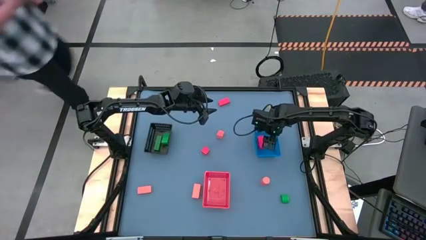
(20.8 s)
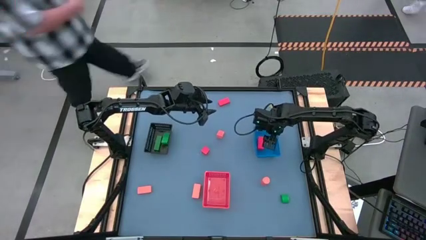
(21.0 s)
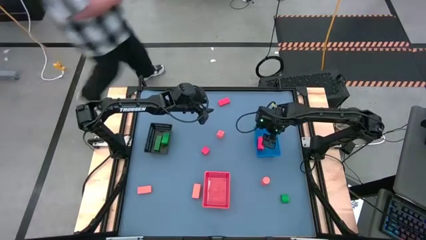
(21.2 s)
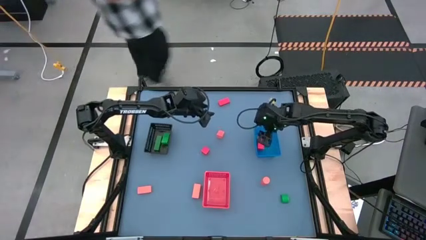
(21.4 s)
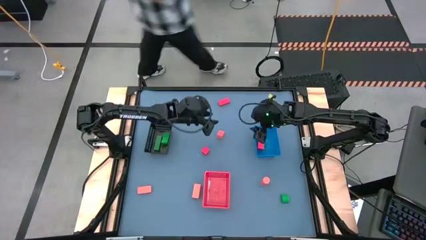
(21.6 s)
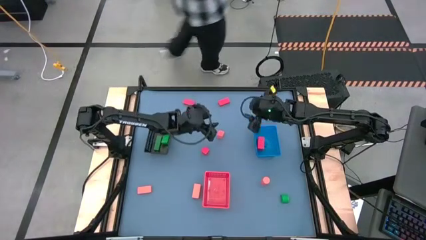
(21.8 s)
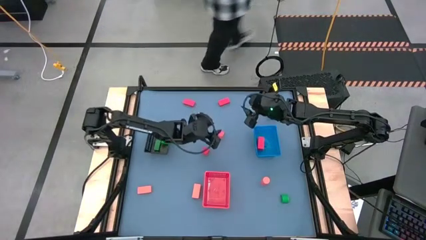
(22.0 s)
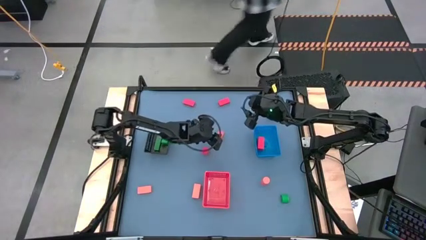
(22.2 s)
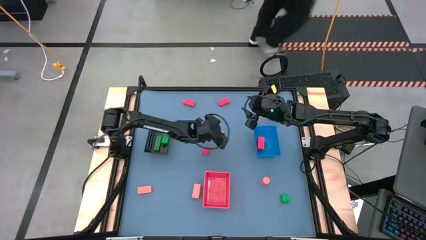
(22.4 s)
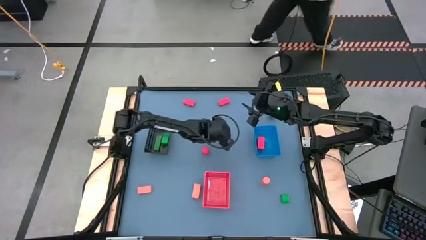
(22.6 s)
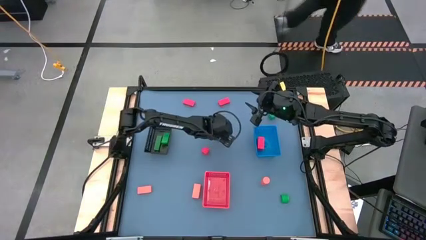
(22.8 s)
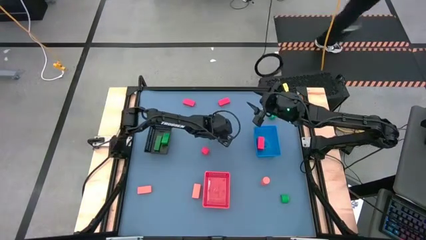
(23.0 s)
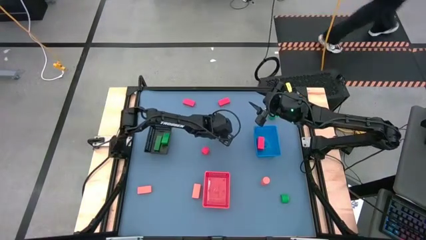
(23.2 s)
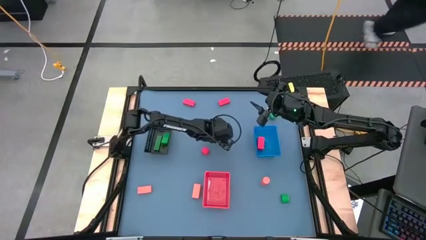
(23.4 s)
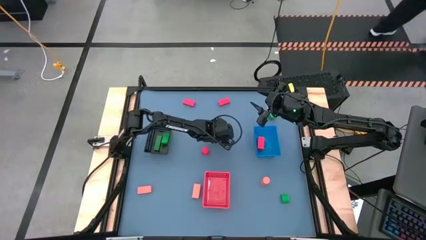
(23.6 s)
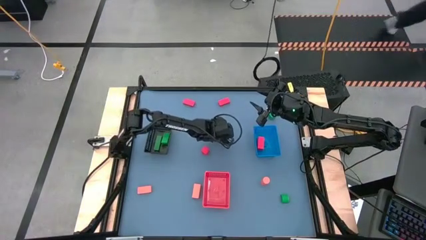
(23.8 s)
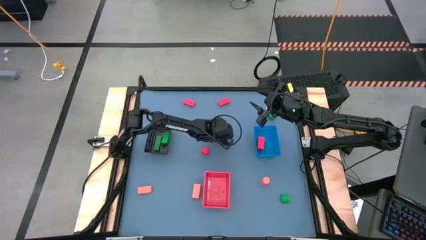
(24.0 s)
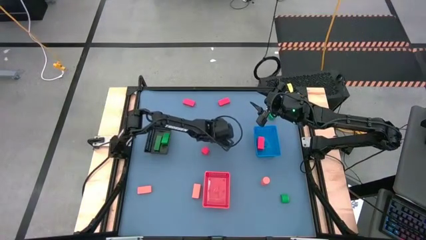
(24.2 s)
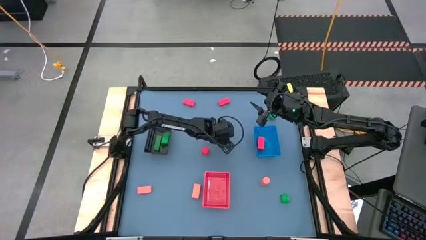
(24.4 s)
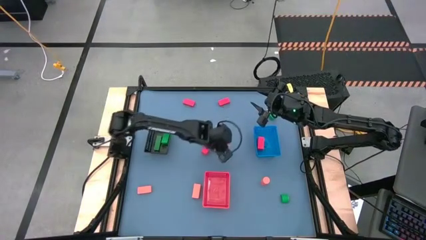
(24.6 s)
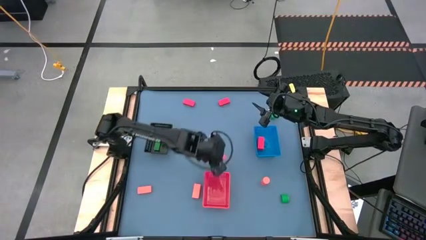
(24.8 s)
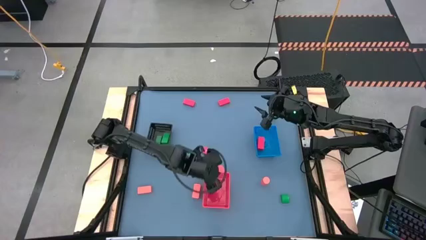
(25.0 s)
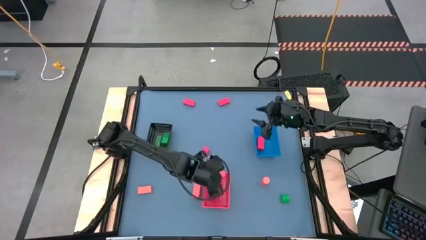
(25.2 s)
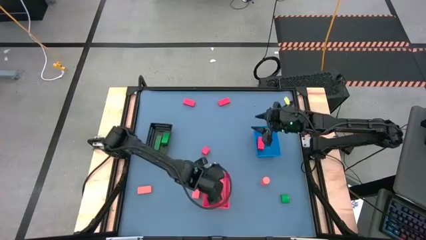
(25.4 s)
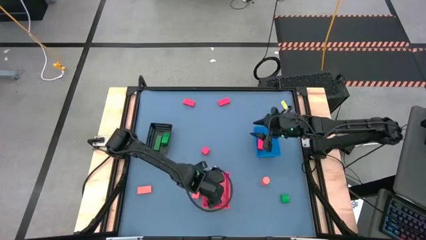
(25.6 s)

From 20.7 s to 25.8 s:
Task: Sort & place blocks by color
Put the orange block into the orange bin

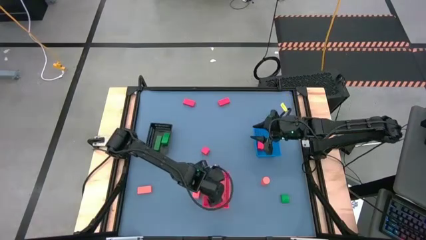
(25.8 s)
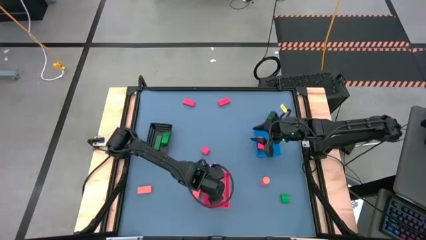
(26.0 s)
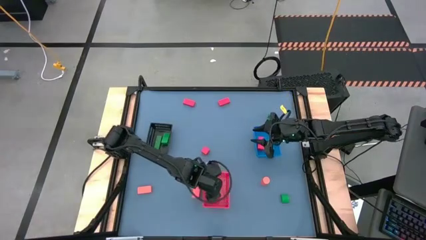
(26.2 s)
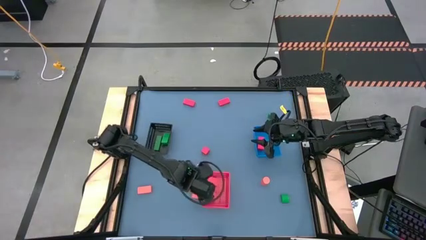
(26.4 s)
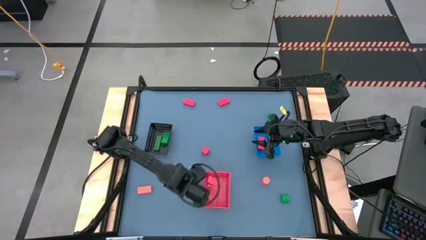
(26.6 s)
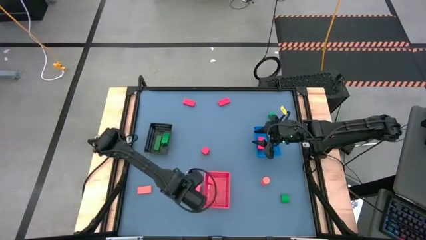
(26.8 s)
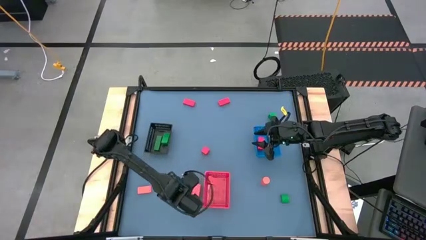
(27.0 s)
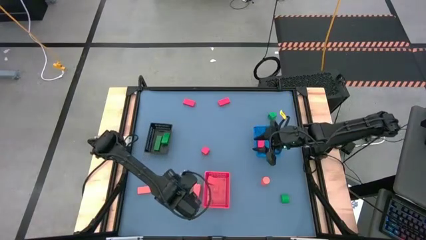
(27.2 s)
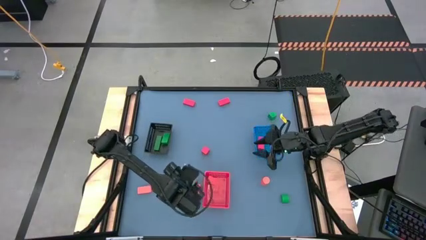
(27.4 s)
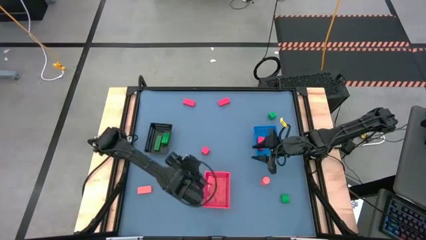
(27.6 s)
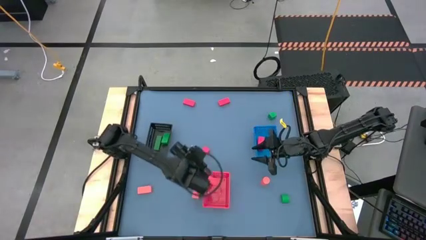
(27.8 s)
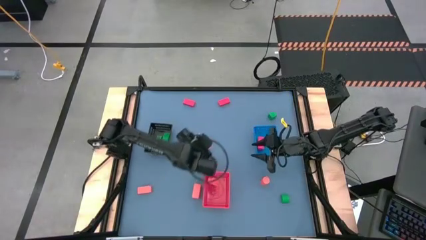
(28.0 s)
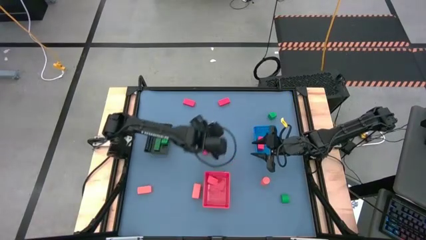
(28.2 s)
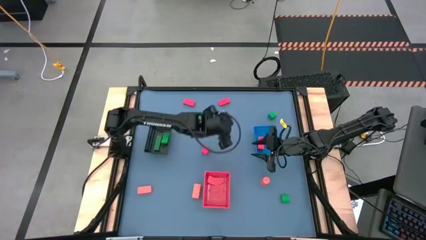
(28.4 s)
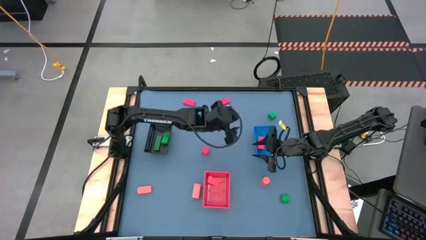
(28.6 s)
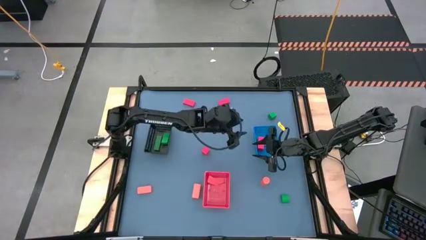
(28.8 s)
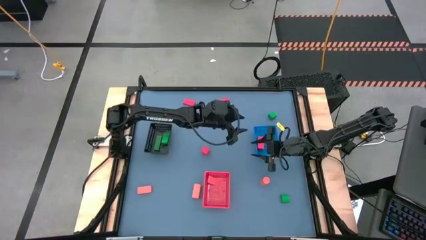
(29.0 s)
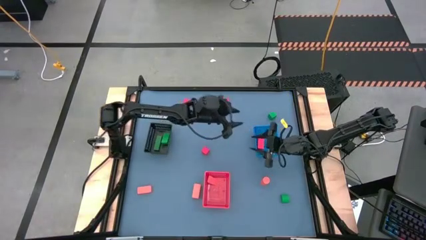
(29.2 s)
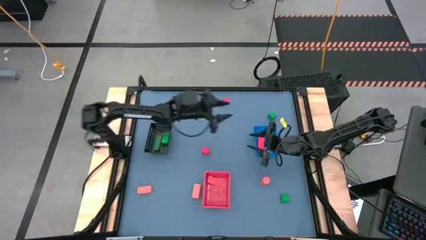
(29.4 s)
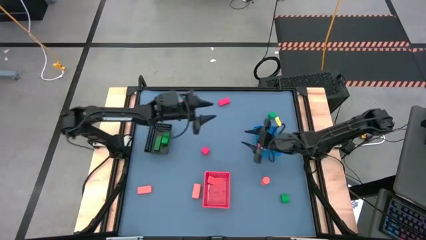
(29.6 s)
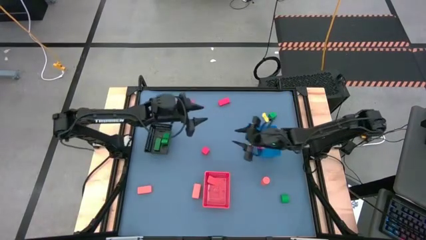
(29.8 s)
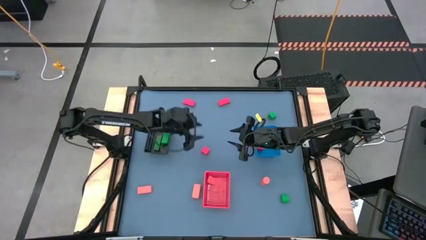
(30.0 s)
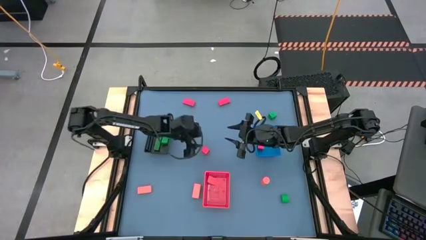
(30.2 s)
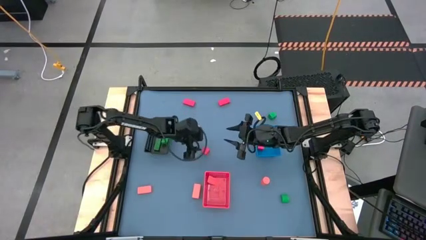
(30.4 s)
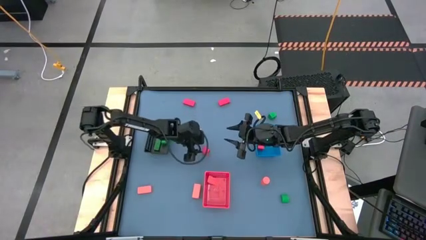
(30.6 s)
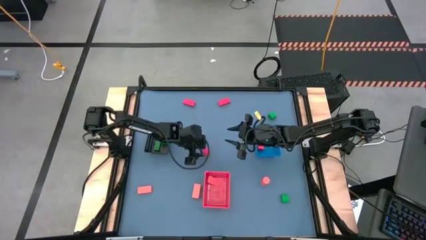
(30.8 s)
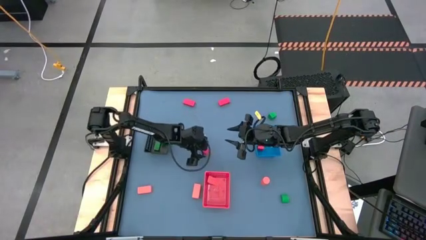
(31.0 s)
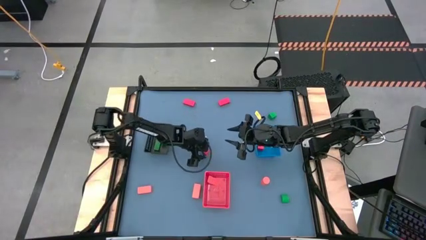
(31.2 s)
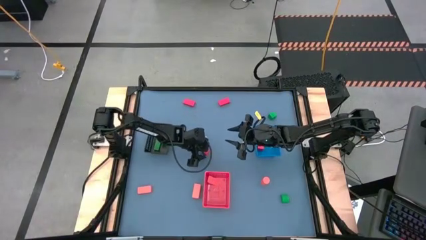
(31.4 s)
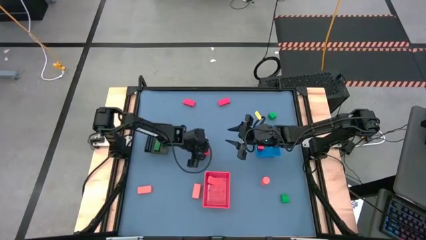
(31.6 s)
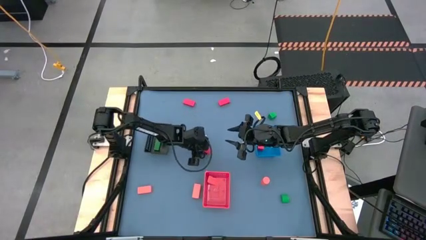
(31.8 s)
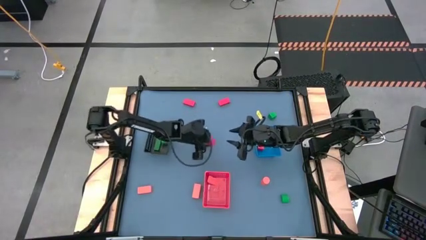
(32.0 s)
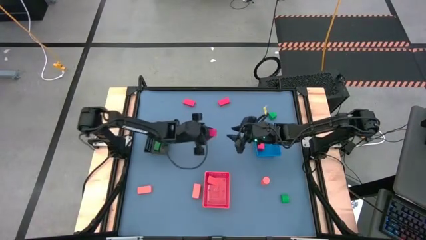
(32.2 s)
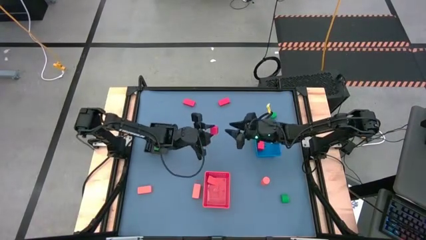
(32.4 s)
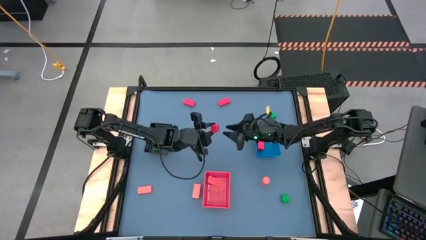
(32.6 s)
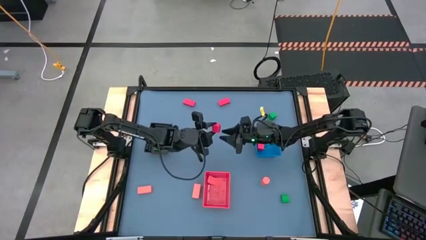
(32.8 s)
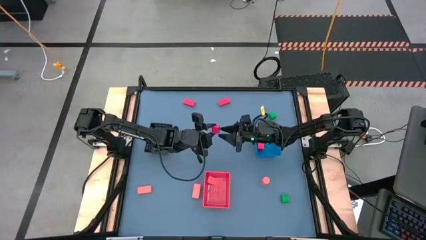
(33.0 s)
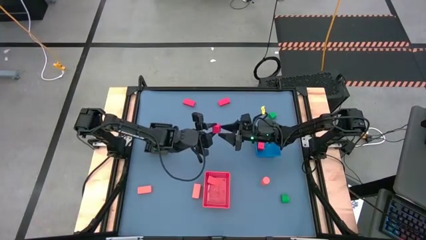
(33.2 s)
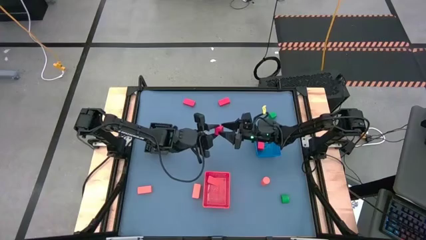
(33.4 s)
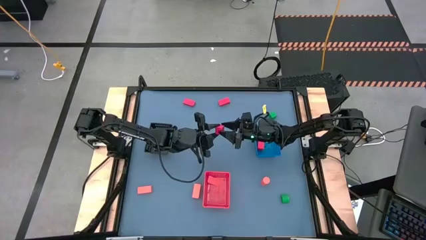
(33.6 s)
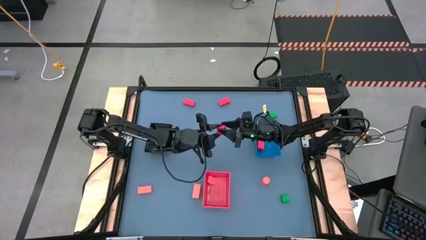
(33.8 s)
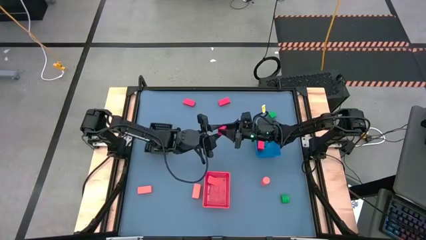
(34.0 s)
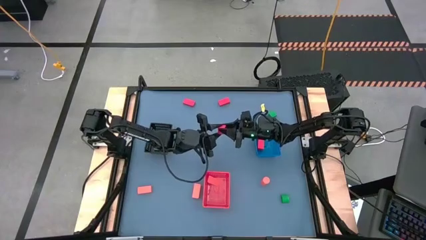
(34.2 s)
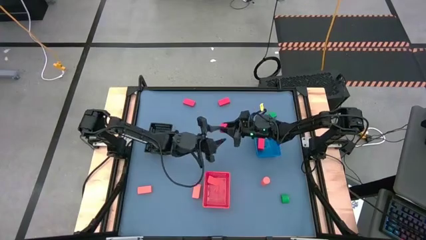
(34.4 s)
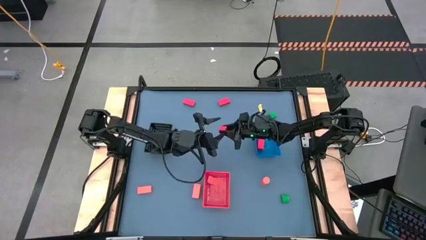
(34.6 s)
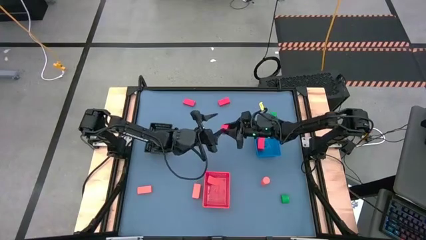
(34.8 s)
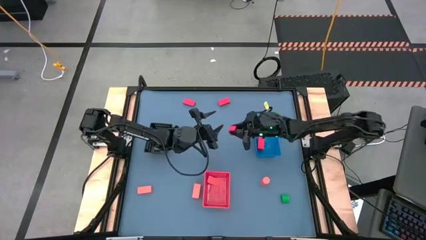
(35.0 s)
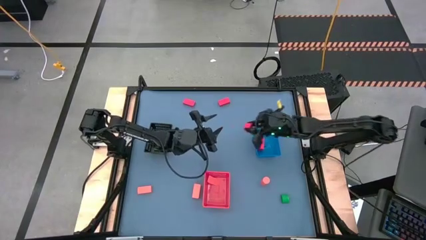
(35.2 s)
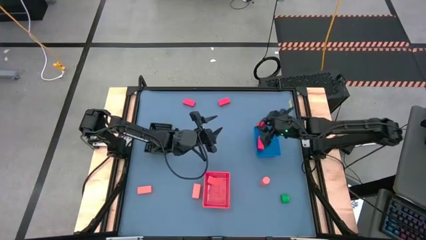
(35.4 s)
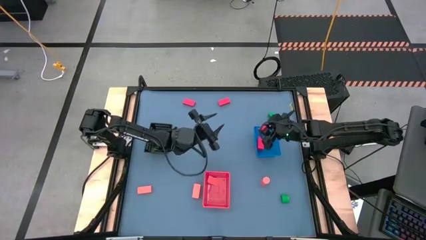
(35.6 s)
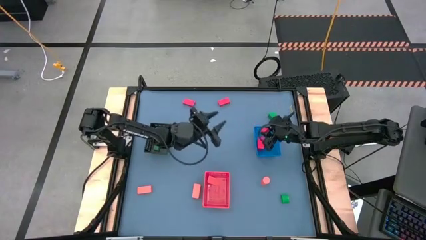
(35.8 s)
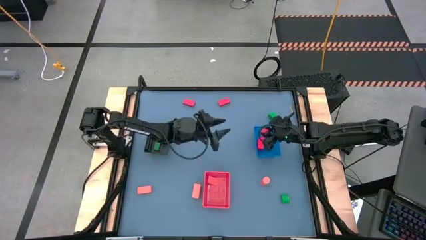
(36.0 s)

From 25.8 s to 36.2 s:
Put the red block into the blue bin

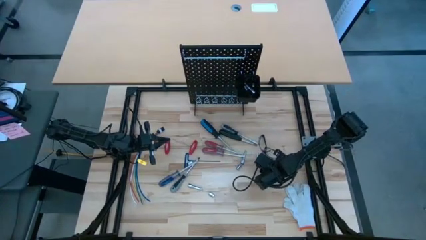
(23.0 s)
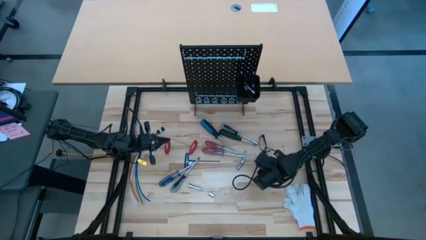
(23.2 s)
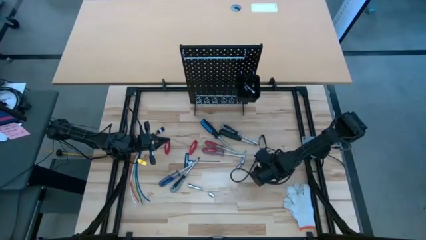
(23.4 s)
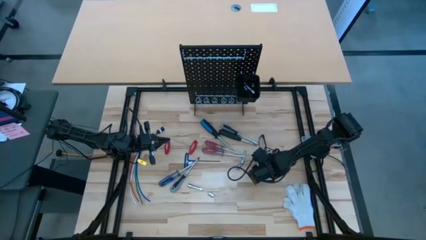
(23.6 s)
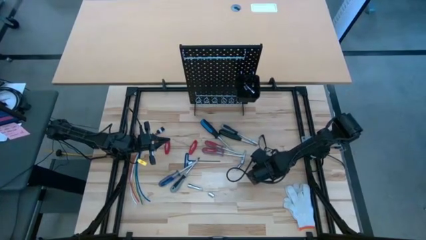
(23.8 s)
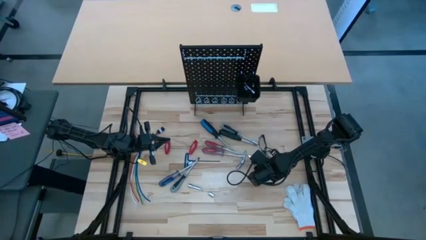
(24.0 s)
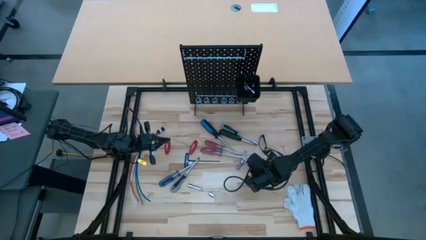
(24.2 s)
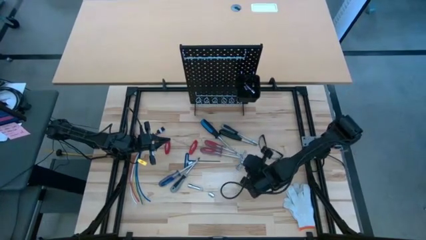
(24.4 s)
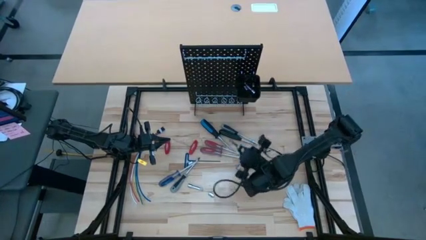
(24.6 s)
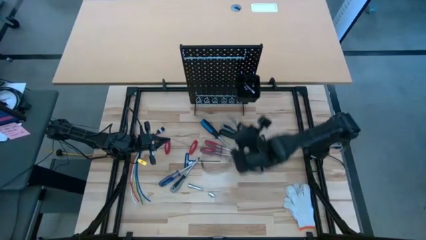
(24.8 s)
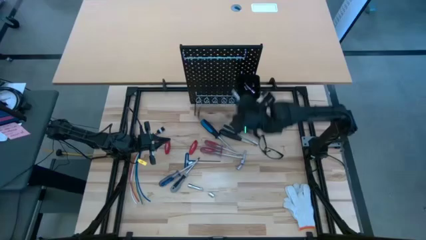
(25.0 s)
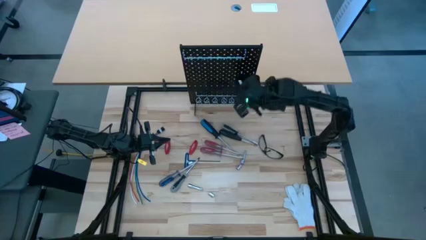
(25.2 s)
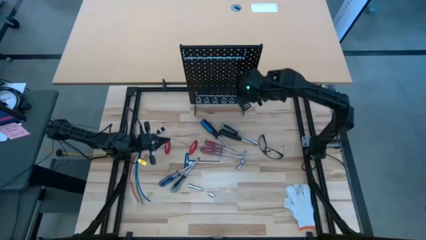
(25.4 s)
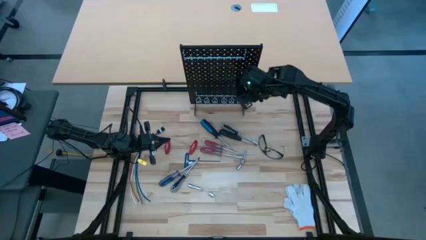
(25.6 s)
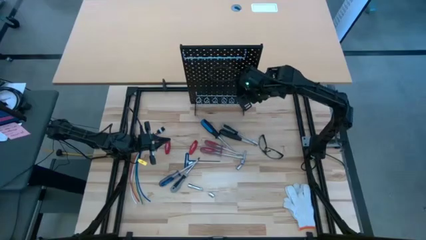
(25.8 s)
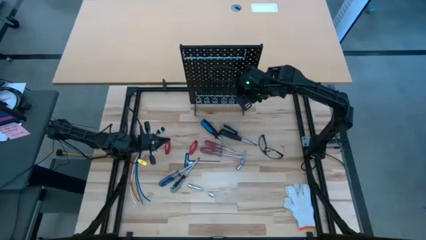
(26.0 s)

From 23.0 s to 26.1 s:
Task: Hang tools onto peg board
Put the extension bar into the bin of the pegboard
